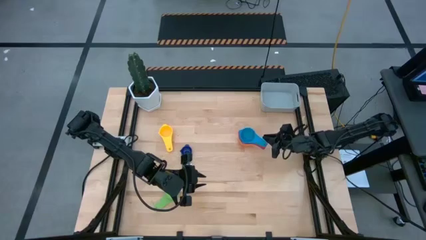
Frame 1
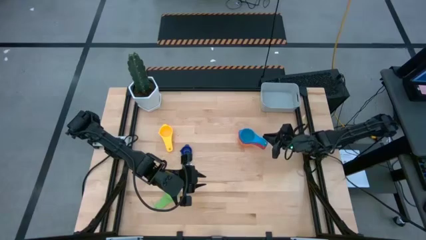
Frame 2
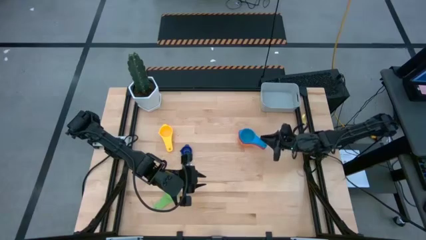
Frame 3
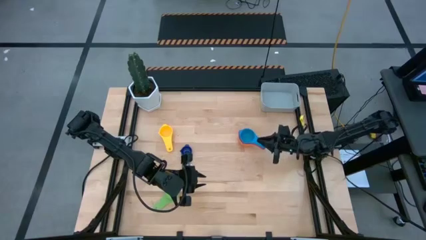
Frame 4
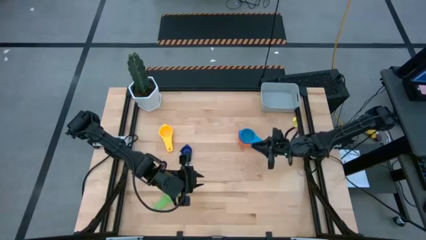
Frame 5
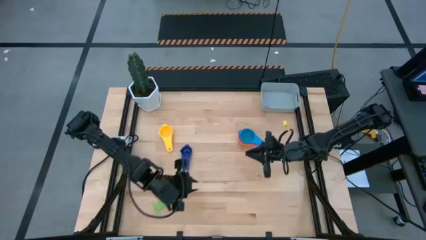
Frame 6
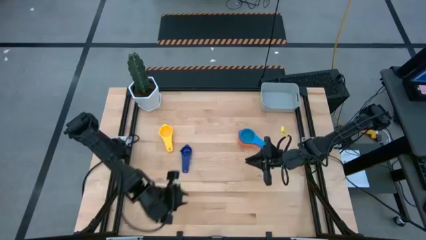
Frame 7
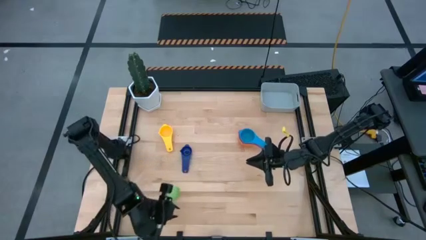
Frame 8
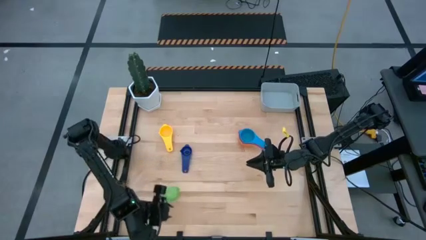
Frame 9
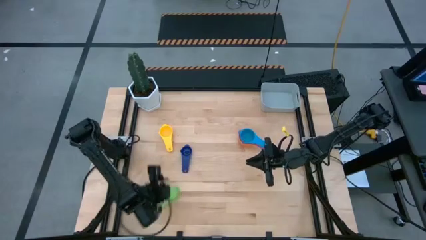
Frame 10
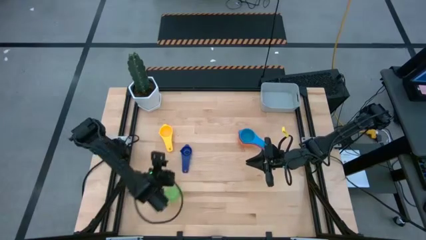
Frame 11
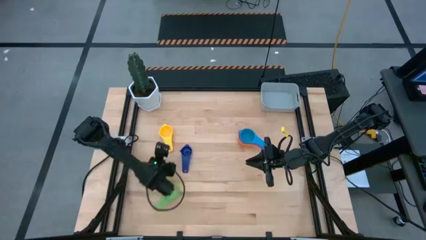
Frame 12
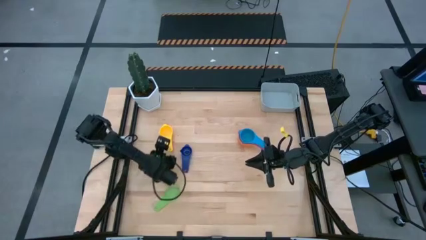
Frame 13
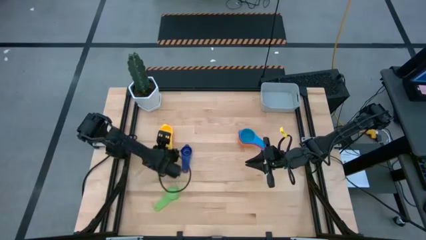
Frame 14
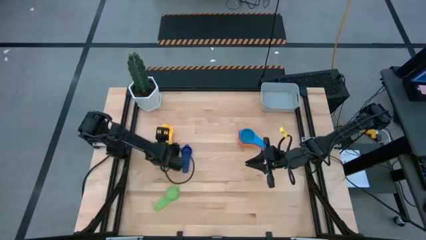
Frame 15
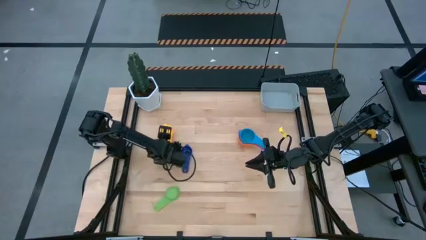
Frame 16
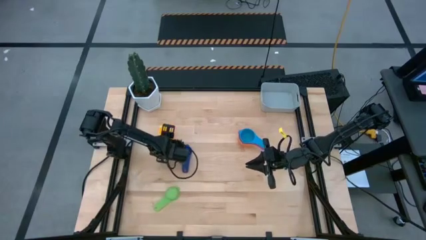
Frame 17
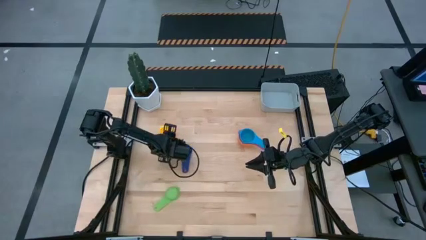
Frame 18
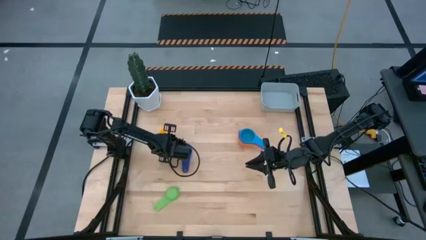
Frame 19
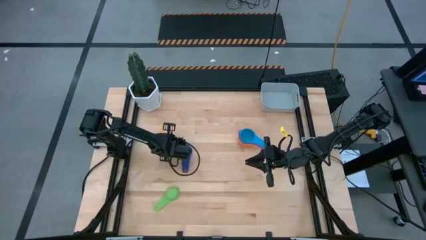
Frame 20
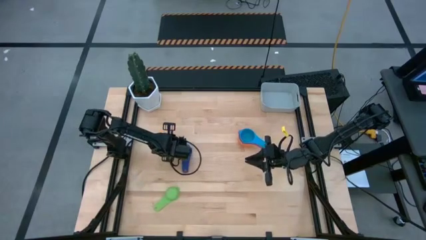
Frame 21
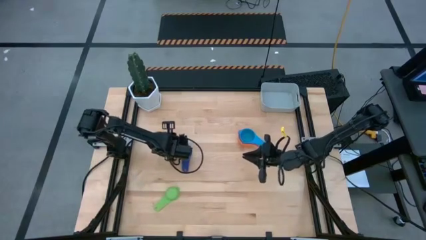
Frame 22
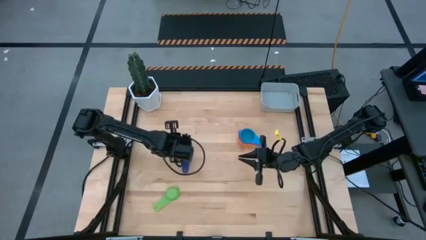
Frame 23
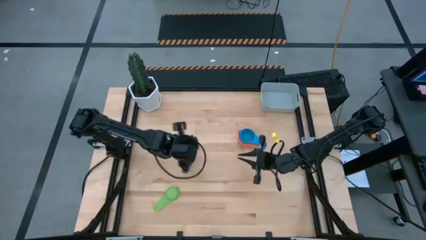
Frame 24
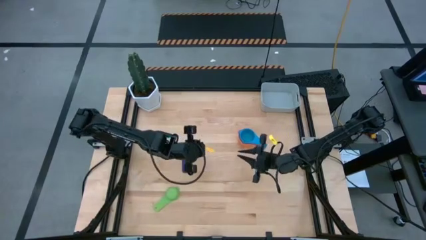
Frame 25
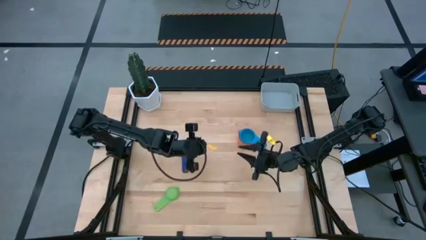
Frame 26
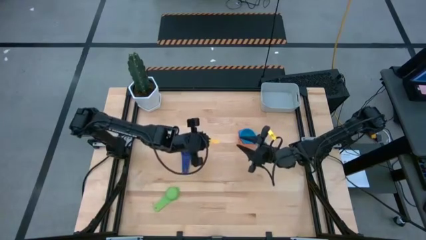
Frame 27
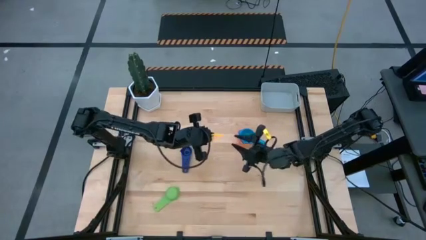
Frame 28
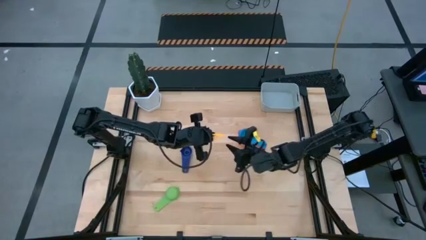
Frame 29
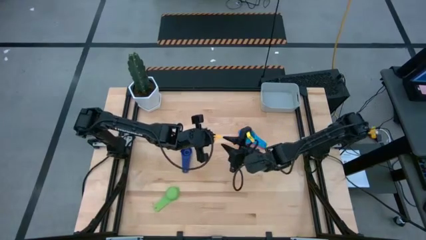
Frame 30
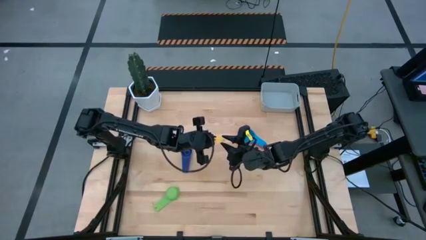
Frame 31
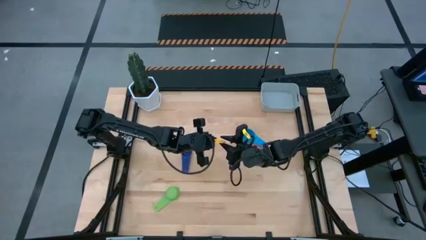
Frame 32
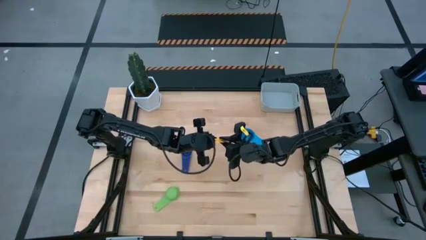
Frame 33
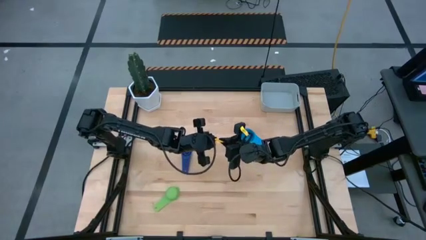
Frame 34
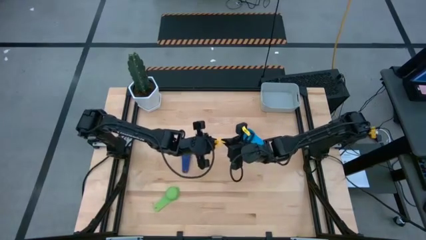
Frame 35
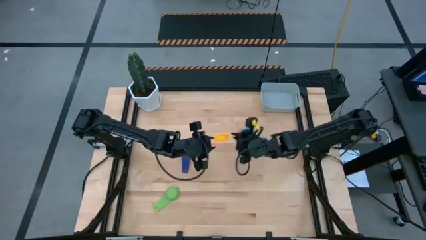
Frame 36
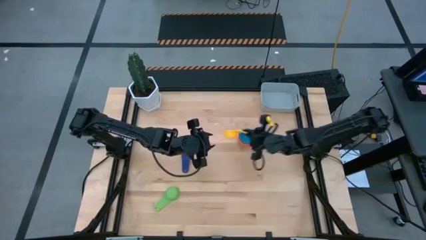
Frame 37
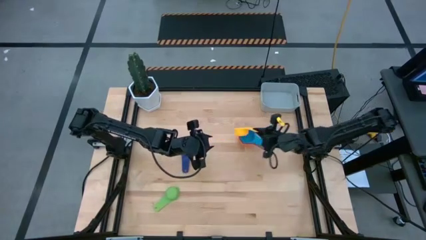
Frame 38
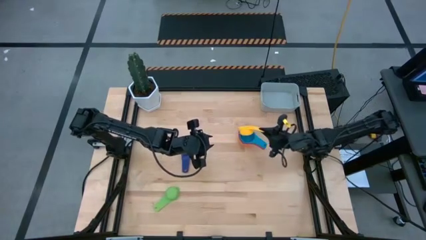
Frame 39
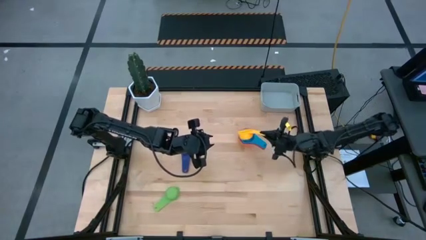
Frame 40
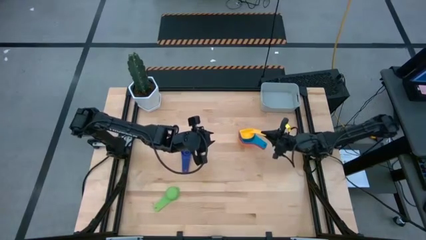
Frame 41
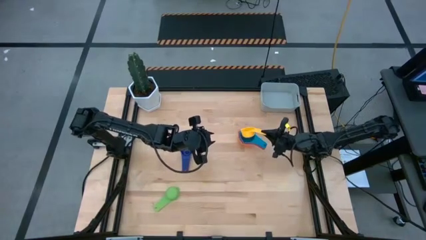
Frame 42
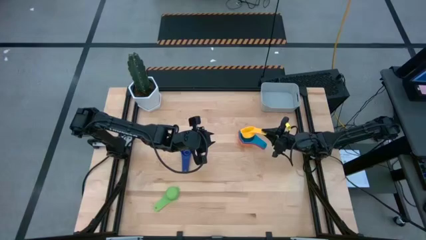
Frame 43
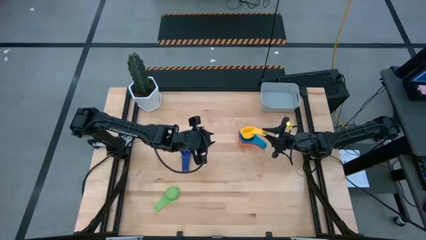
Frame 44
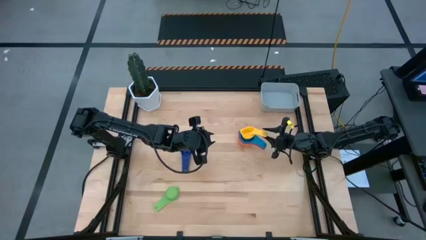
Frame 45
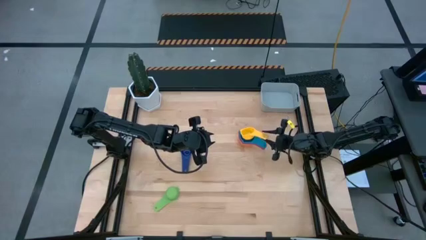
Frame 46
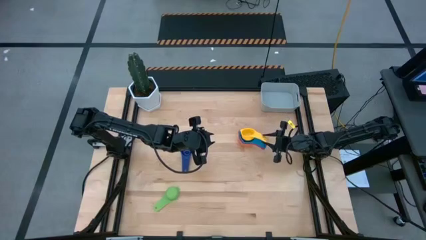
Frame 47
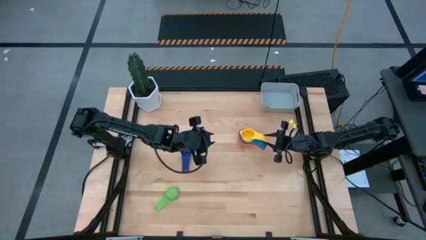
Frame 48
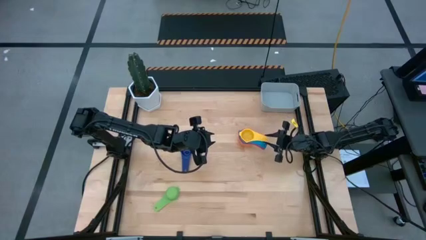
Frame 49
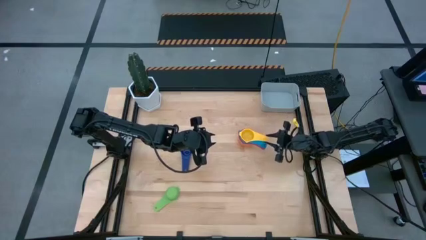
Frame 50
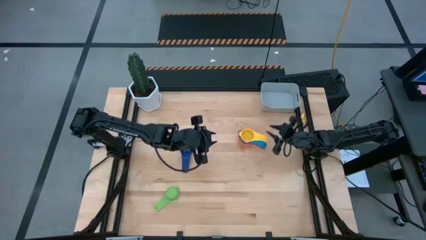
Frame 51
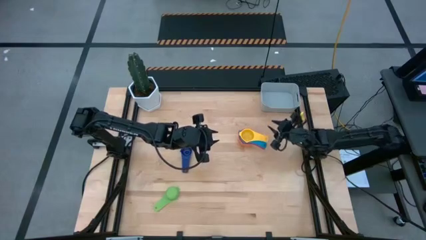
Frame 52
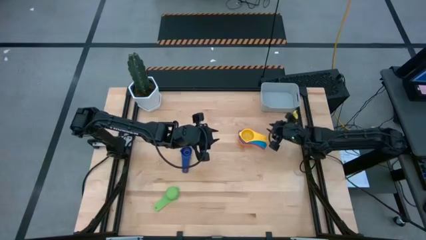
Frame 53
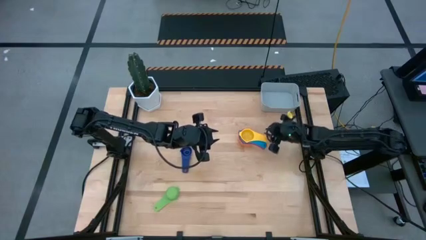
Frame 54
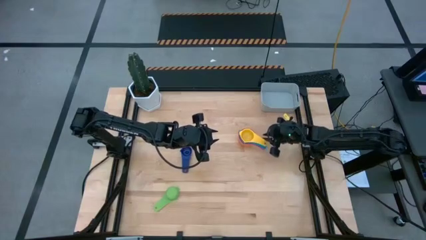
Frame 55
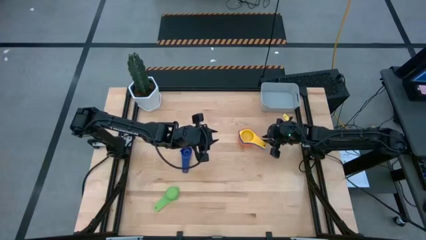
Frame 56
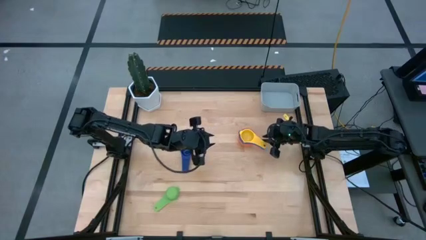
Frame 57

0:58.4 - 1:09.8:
Task: Nest measuring cups in basket
Stack the yellow measuring cup on top of the light blue measuring cup

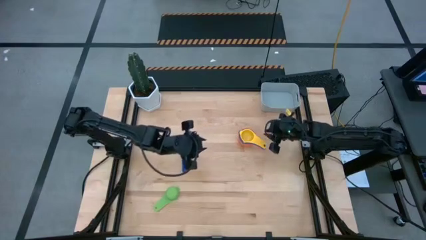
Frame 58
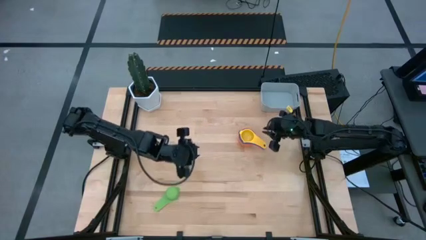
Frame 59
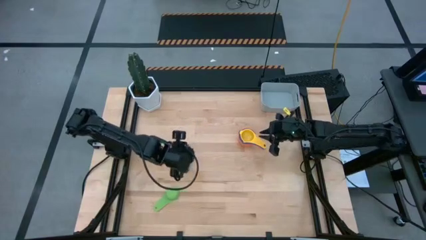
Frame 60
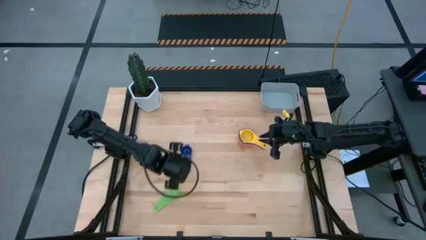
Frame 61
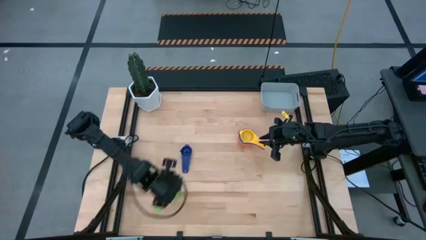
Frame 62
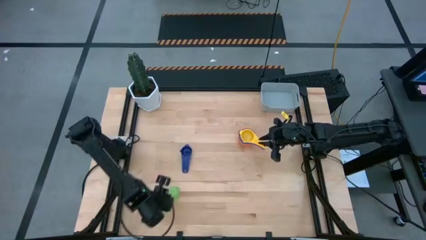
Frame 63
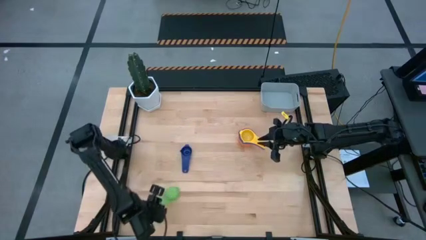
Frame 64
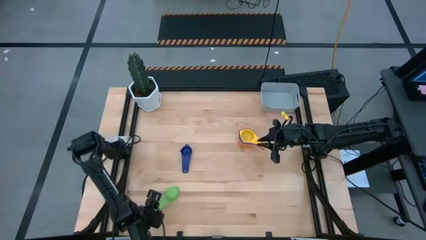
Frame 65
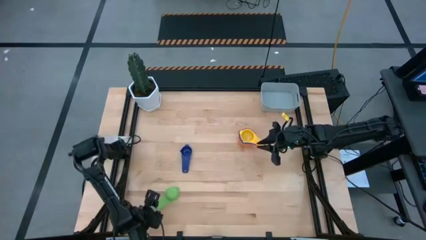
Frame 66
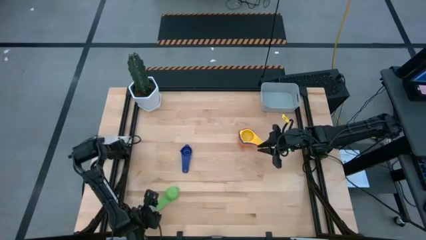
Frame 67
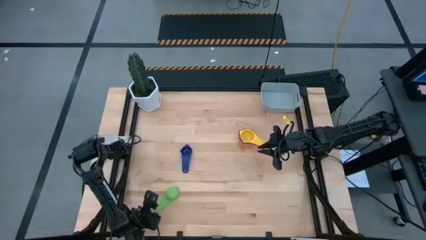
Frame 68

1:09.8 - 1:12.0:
Stack the green measuring cup on top of the yellow measuring cup

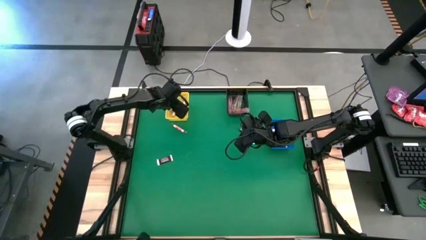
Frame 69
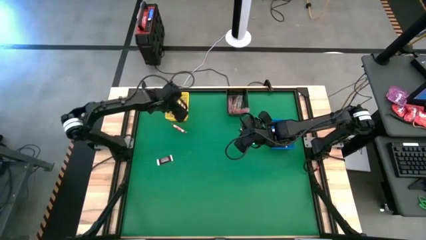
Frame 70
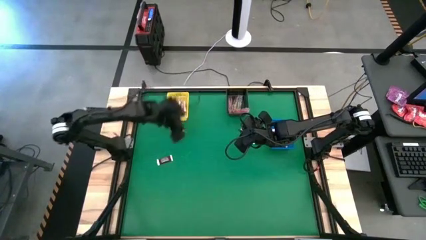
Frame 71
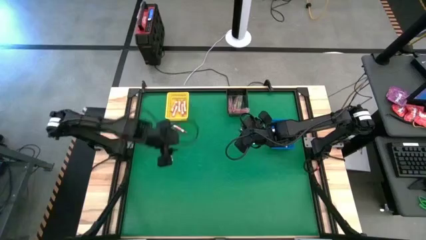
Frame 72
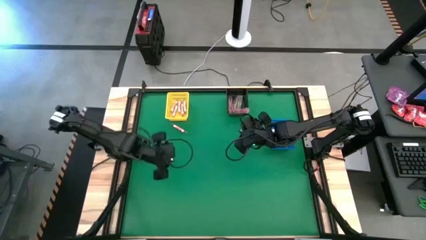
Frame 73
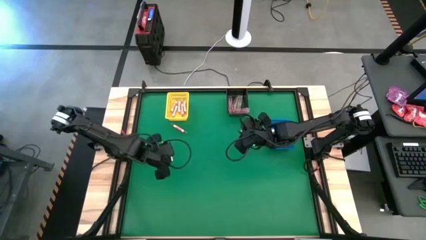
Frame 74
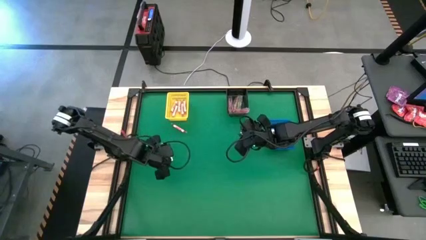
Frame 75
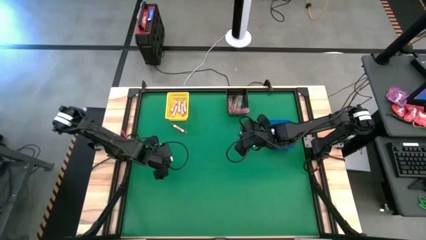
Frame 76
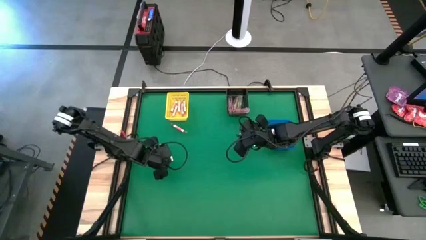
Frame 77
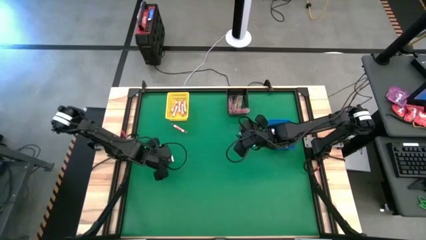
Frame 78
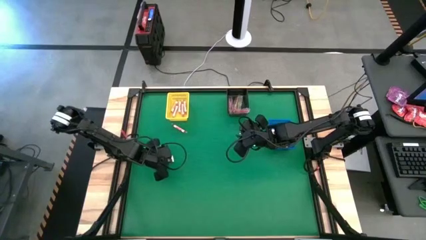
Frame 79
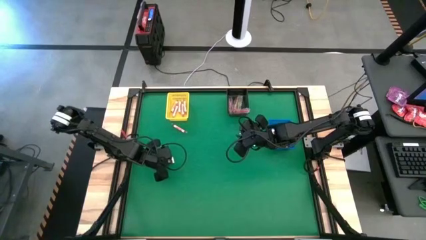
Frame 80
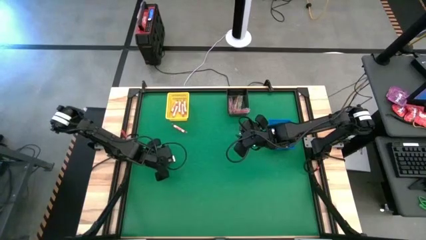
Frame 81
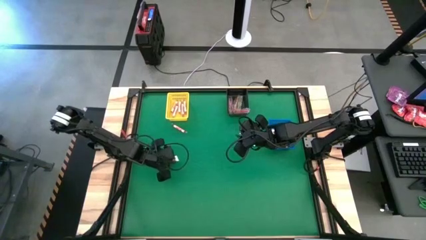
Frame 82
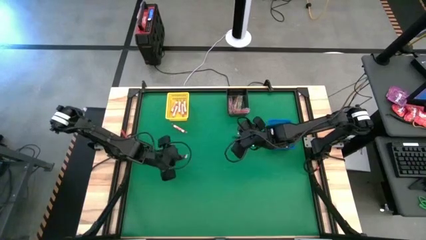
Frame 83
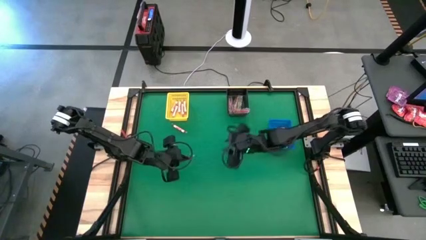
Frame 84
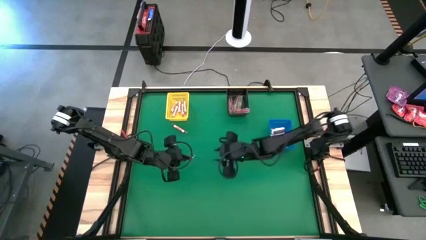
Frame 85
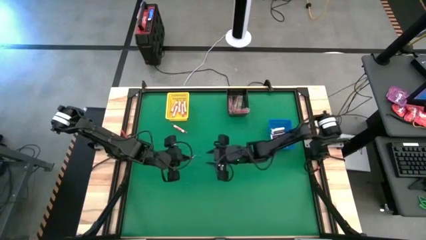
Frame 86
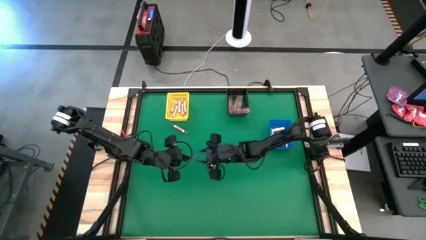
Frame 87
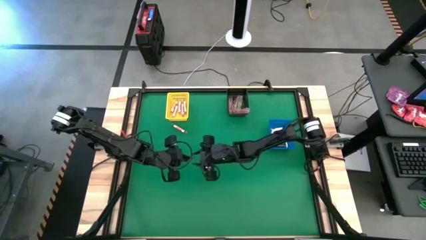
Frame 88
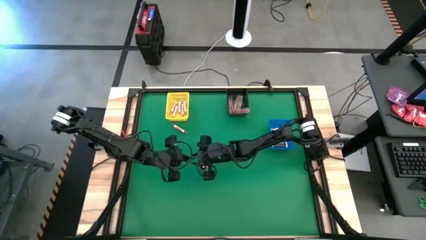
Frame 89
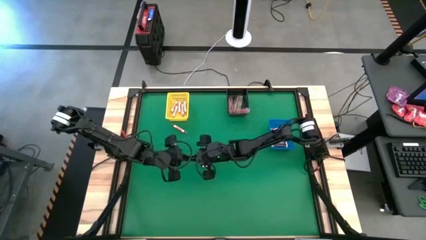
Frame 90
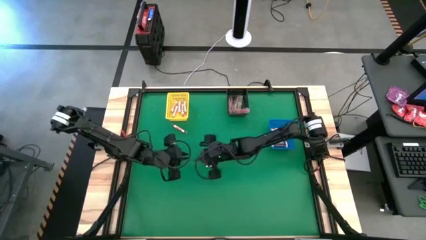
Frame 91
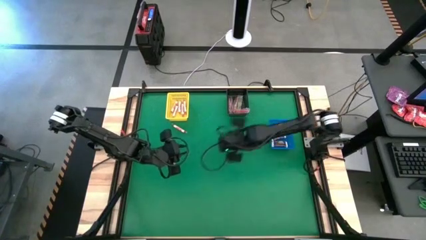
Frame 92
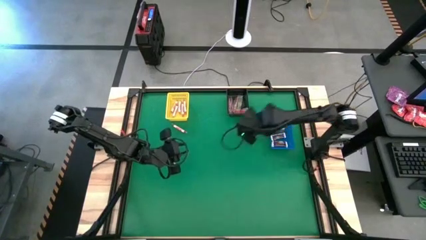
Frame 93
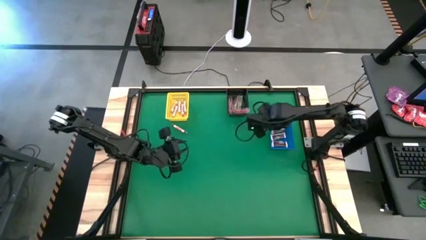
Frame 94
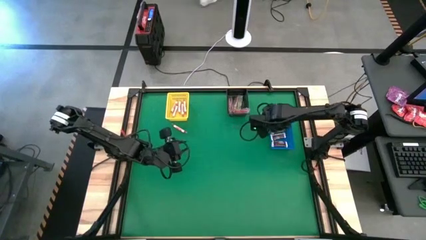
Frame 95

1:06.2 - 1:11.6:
Task: Sort candy by brand, put in halloween buckets
Put the brown chocolate into the blue basket
